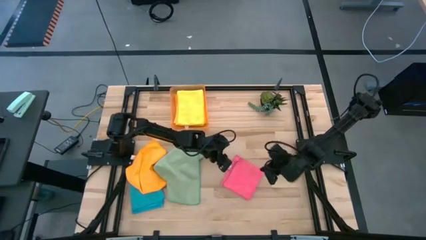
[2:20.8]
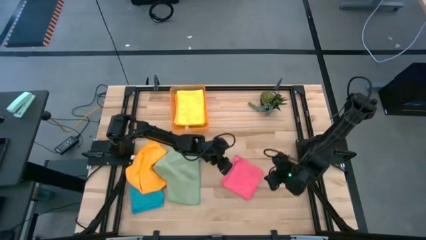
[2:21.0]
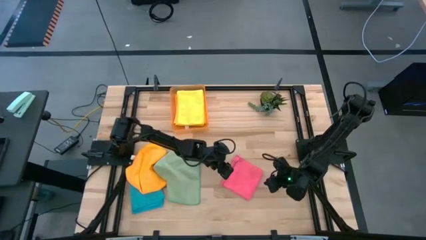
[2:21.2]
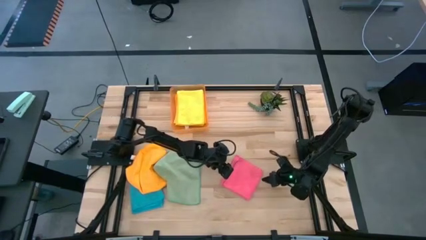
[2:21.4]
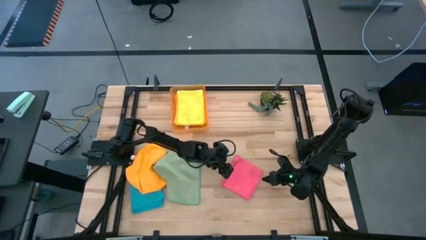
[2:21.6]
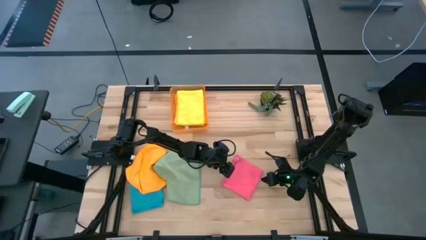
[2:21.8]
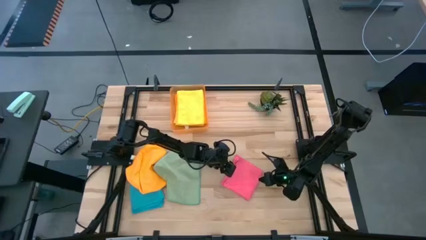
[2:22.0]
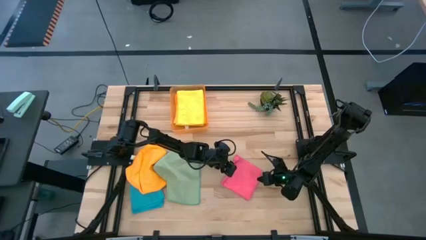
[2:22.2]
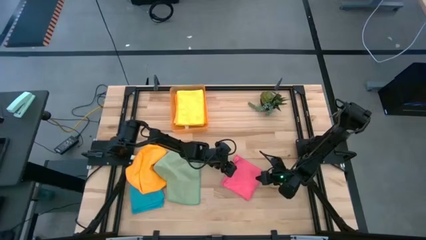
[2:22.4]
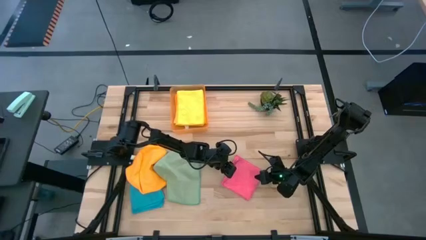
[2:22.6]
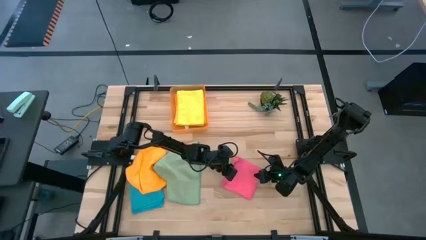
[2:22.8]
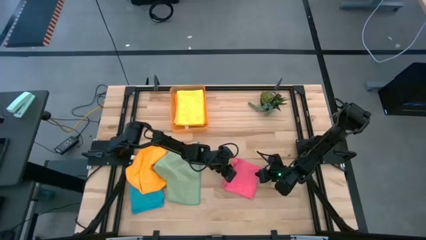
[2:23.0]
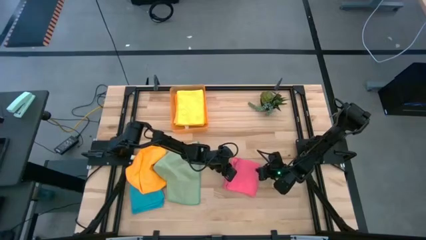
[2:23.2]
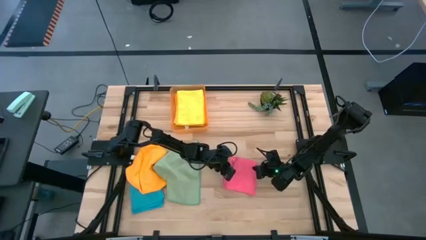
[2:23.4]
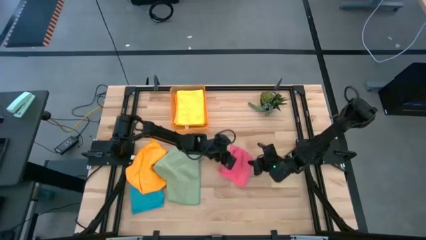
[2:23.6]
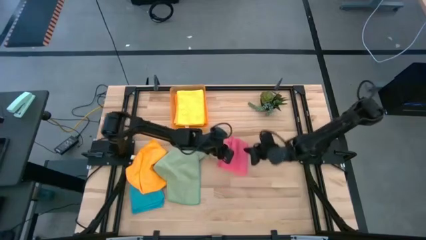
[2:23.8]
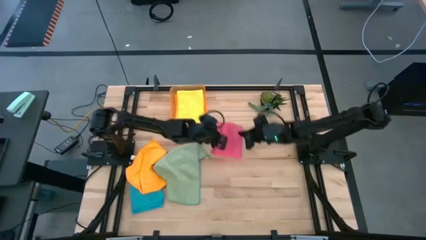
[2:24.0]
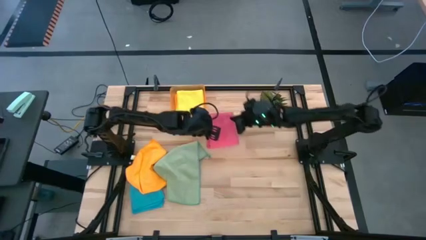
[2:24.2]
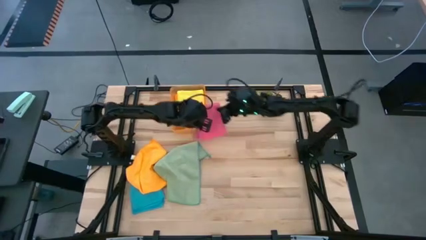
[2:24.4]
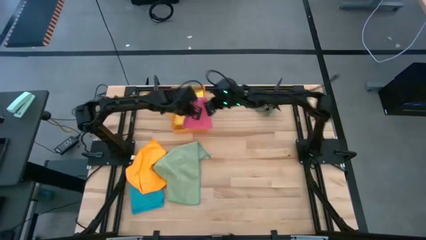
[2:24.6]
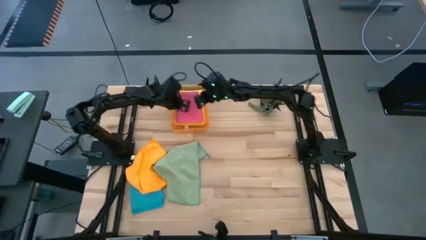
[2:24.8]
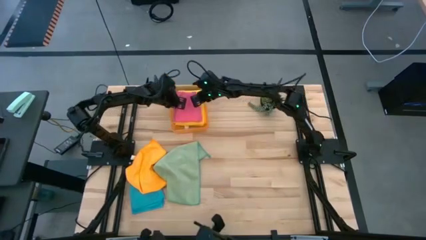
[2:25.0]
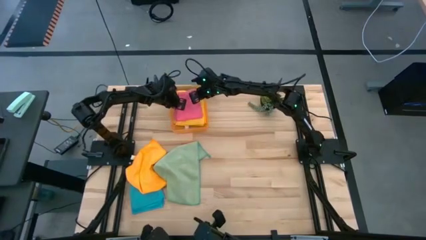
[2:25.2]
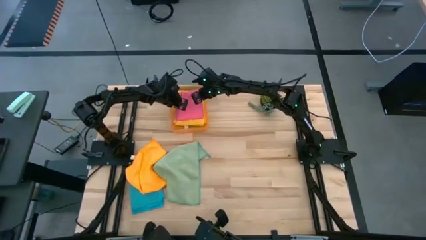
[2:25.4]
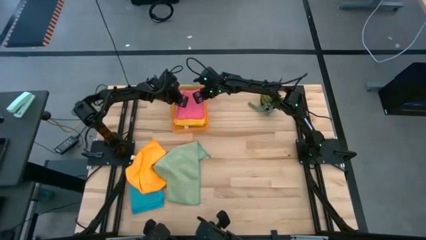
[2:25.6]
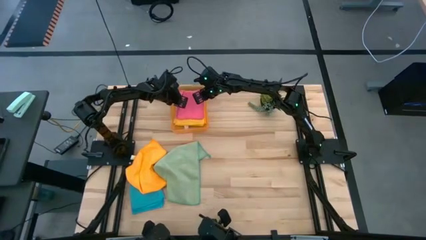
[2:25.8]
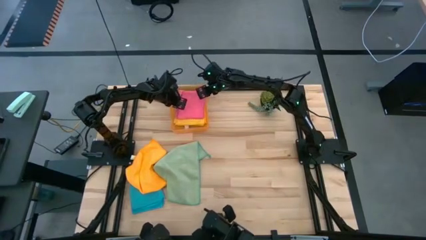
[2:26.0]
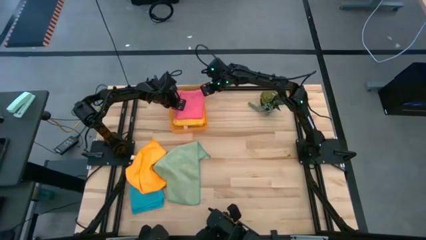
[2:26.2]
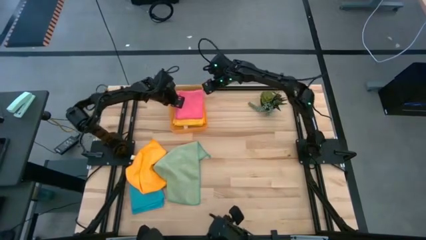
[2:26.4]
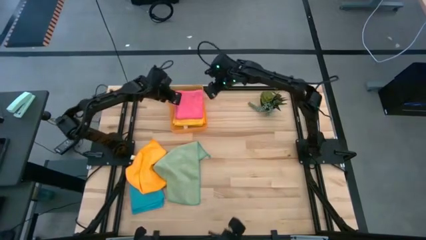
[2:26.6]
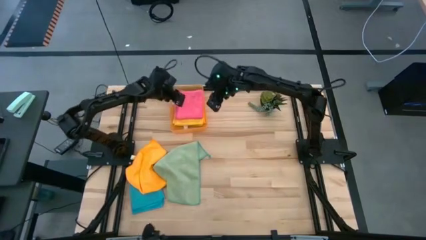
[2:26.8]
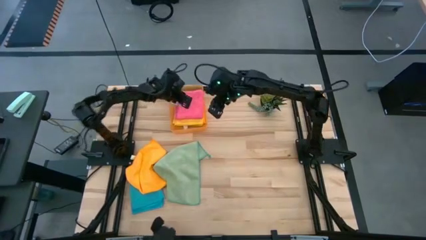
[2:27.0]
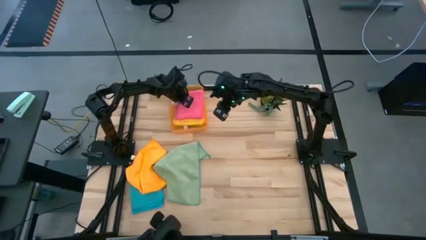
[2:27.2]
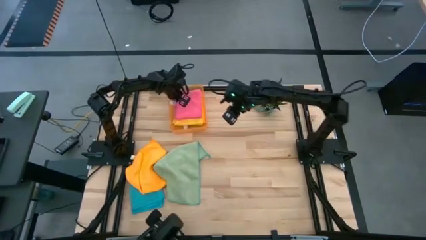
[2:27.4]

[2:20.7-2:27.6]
Task: Fold microfiber towels
Put the pink microfiber cloth into the orange bin

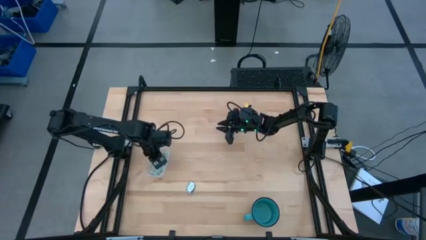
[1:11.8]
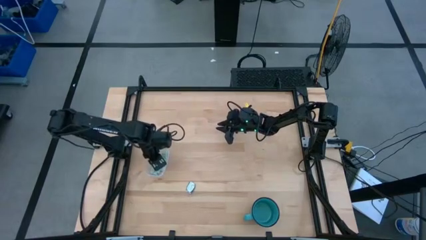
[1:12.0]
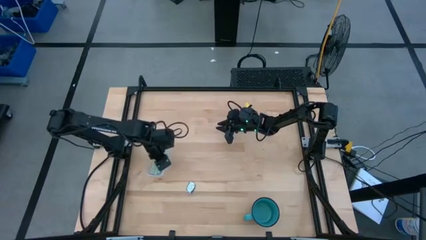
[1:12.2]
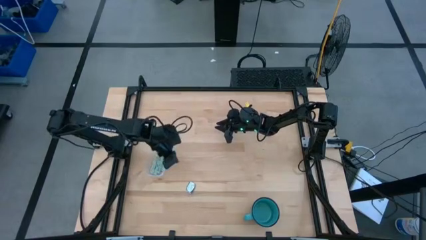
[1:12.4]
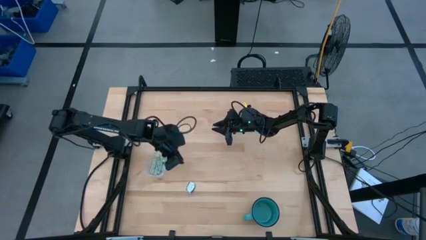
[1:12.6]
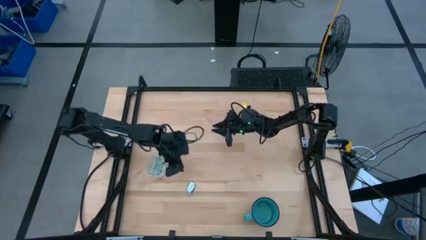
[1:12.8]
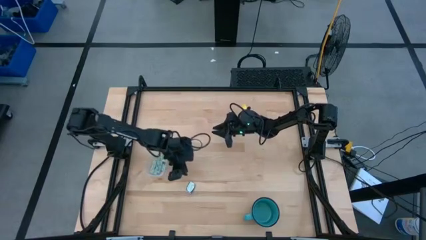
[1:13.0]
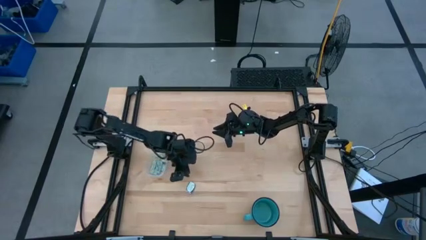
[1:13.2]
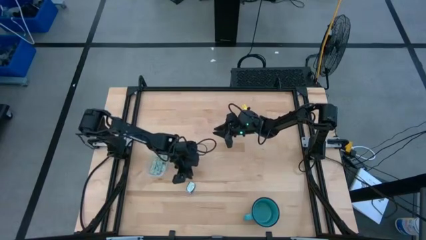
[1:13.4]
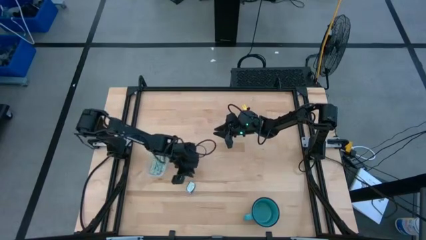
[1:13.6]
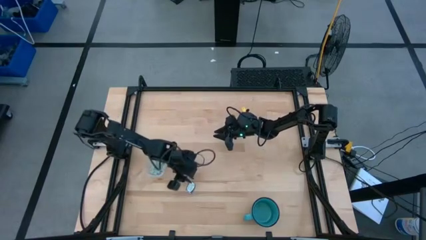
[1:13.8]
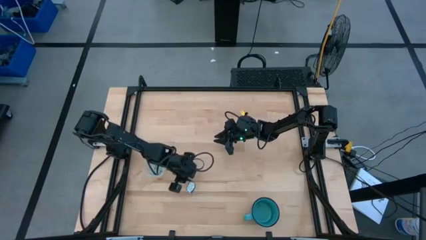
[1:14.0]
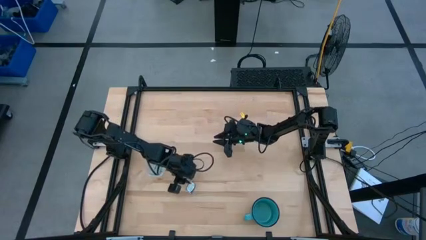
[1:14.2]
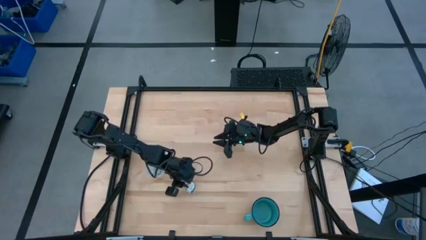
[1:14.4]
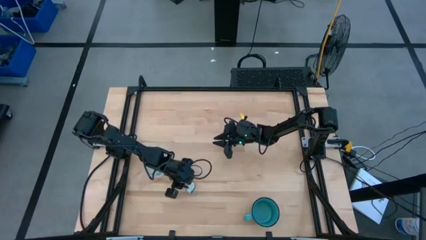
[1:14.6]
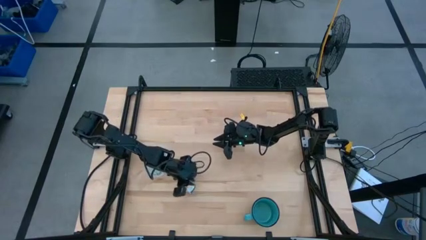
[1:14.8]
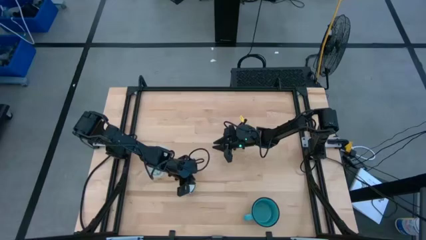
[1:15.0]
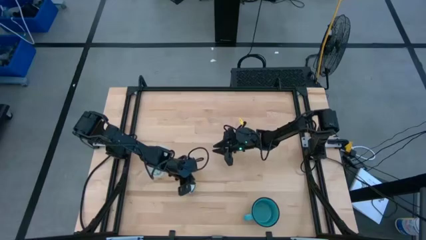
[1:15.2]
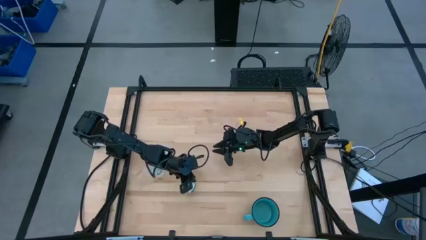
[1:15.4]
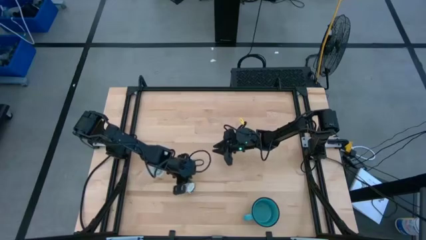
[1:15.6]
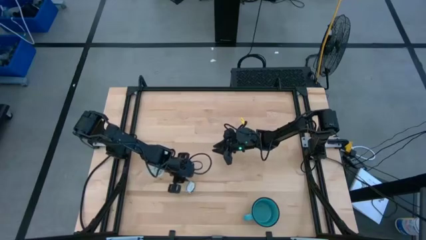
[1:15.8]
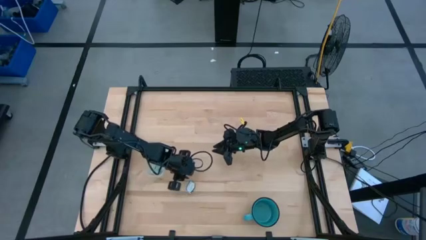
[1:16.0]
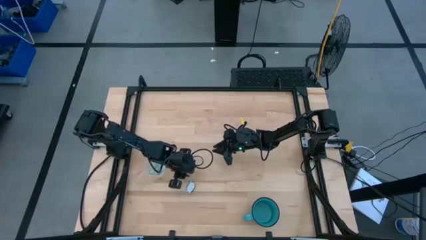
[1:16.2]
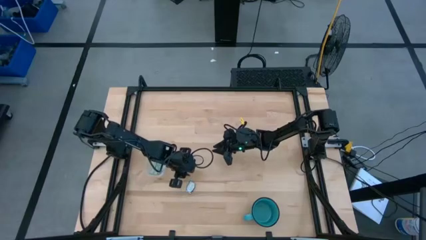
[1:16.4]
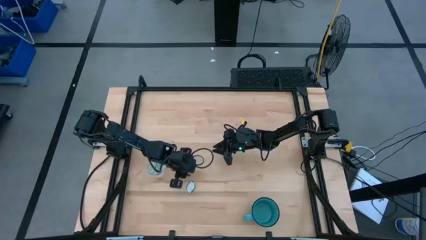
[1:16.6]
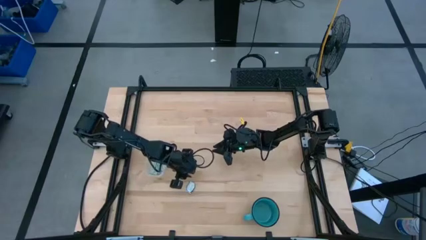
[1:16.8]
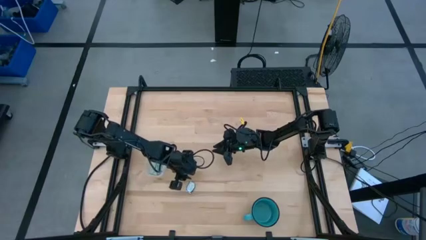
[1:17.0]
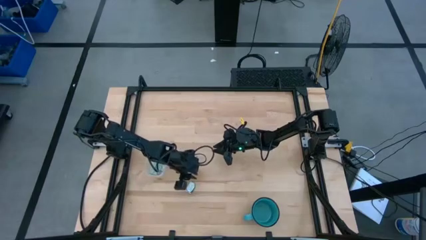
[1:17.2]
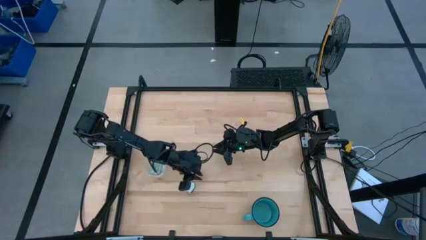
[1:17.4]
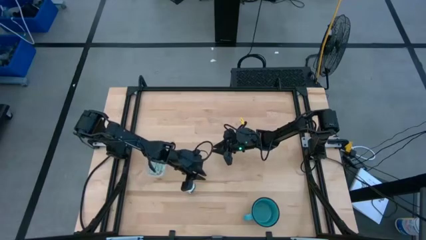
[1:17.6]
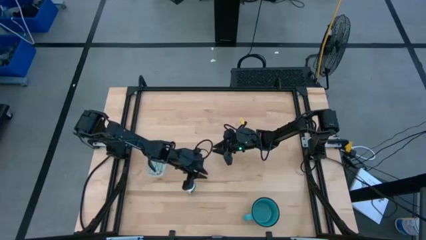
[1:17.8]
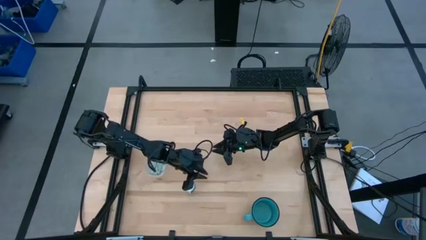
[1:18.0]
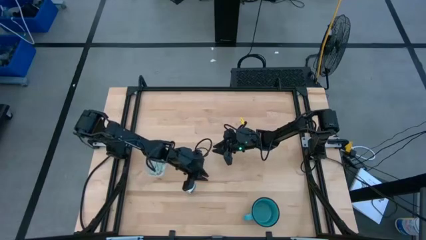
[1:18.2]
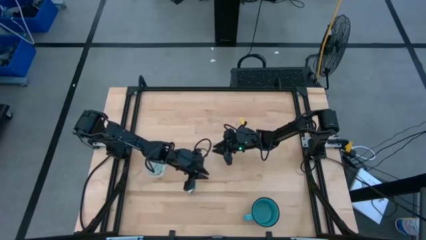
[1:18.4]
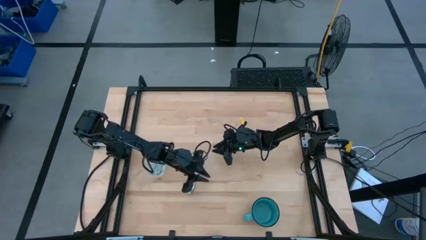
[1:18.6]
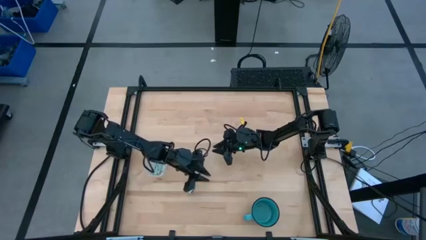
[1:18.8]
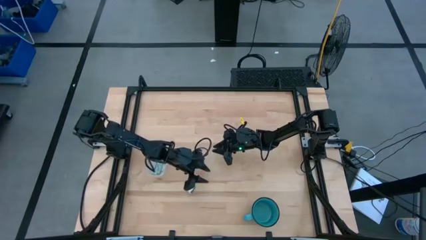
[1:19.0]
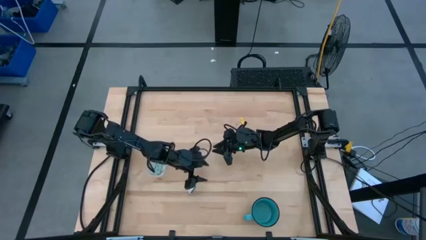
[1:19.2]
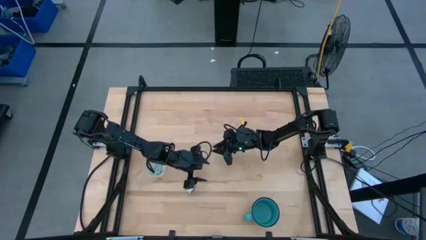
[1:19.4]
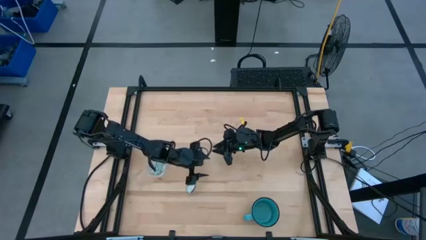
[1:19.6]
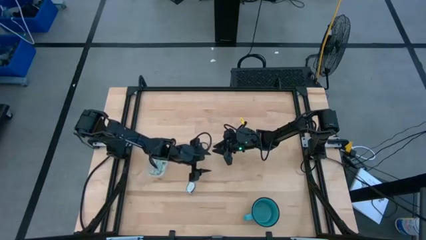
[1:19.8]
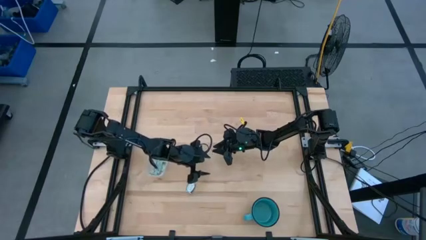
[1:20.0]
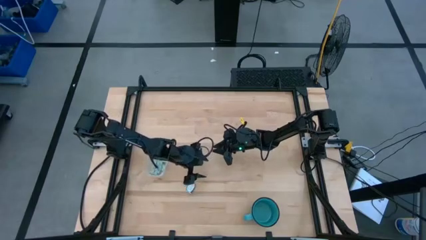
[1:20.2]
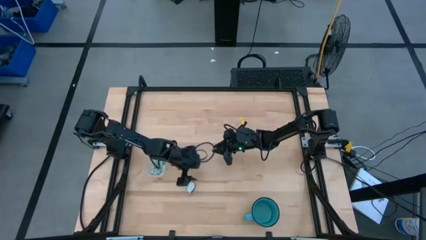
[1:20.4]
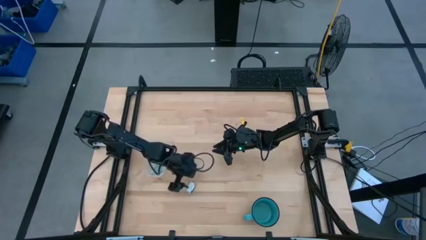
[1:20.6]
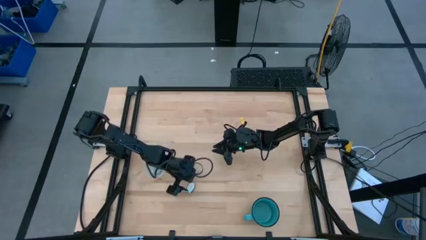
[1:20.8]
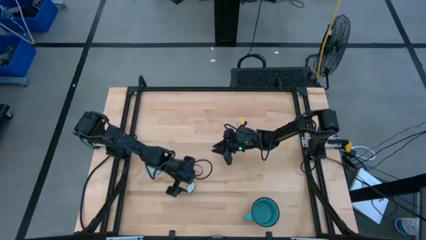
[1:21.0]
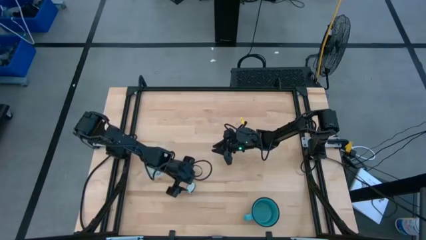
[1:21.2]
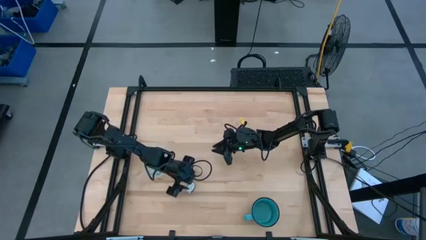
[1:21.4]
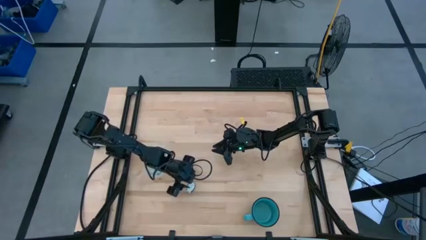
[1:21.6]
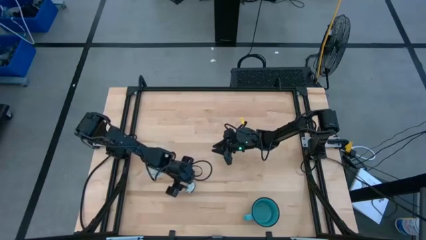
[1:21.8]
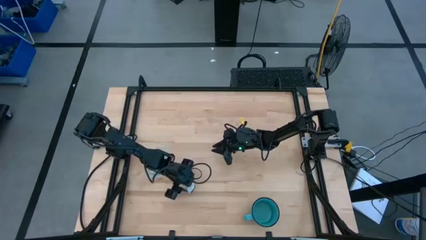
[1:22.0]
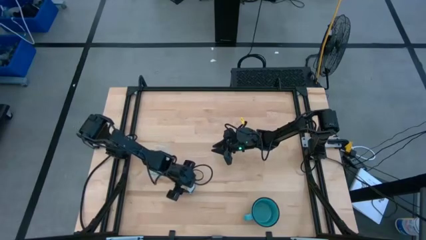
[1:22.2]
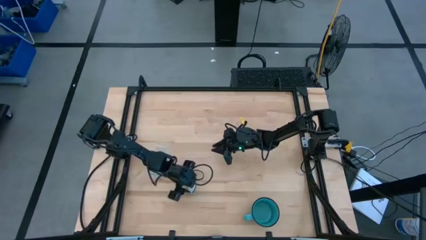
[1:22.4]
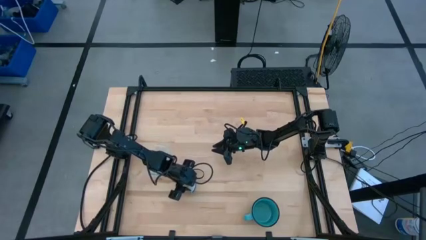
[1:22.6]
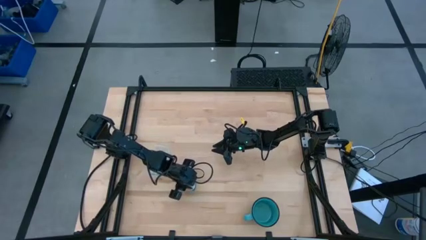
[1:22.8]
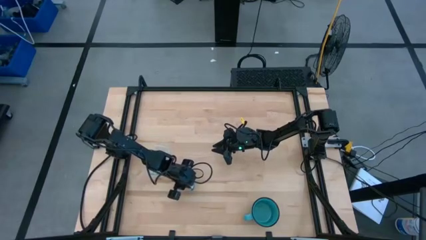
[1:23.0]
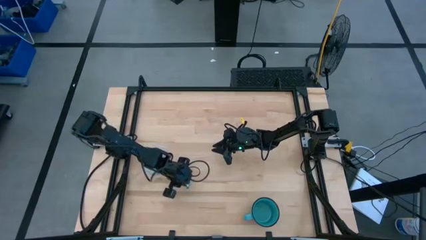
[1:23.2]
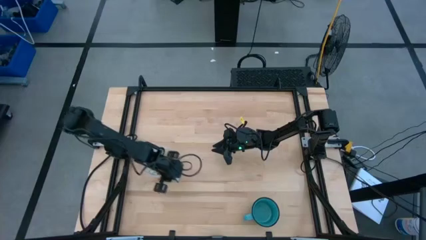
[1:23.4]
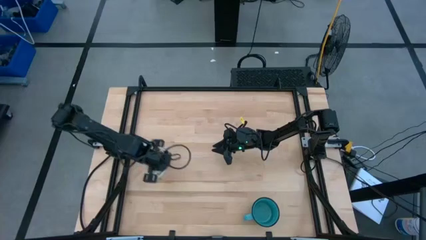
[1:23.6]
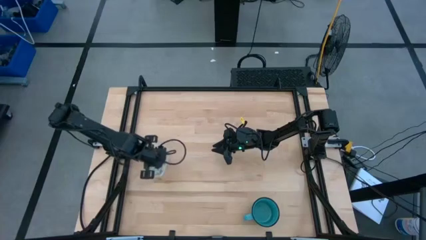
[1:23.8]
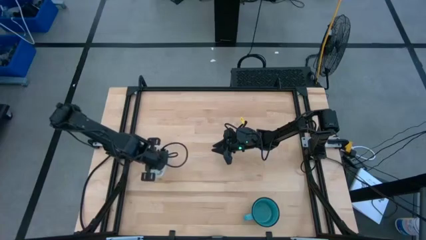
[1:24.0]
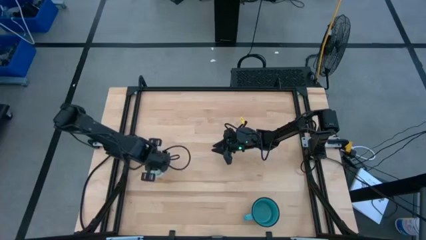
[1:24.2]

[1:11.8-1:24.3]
Task: Pick and place Stevia / Truvia into bins
Put the dark green stevia packet into the transparent bin
